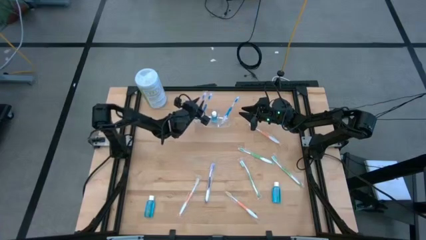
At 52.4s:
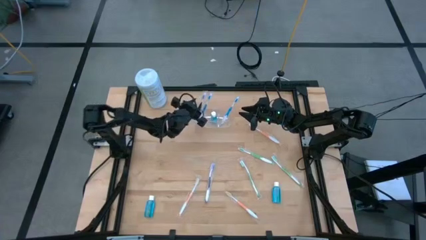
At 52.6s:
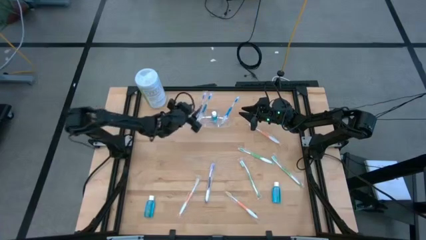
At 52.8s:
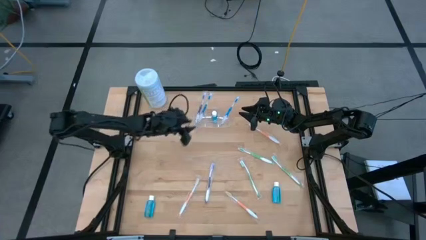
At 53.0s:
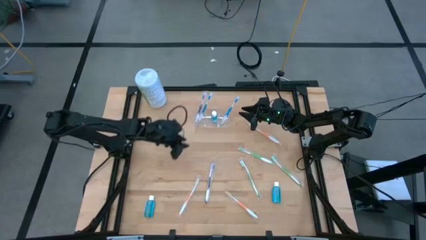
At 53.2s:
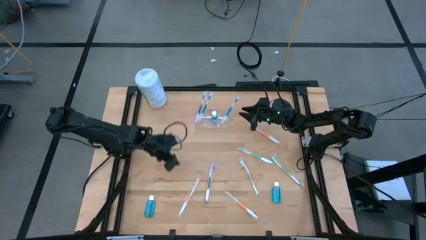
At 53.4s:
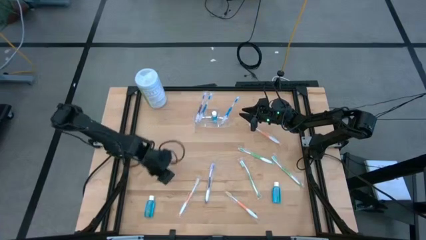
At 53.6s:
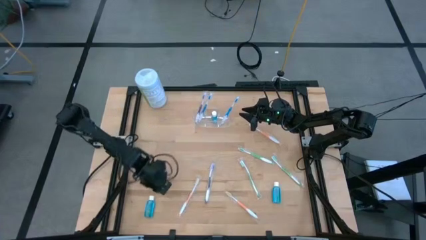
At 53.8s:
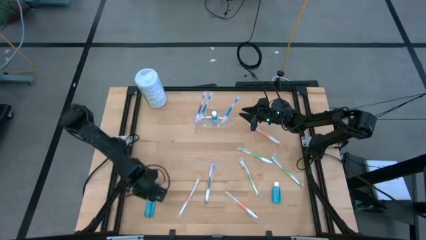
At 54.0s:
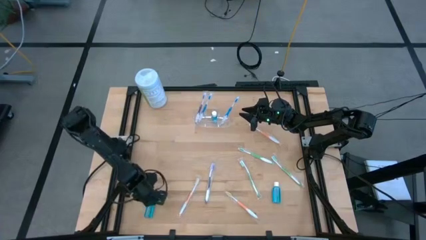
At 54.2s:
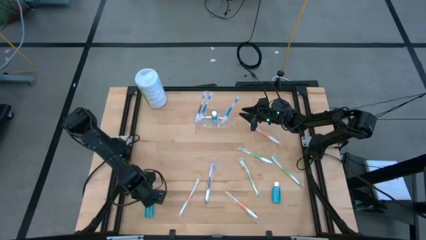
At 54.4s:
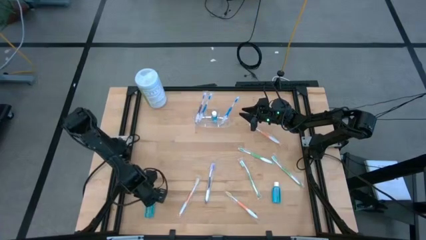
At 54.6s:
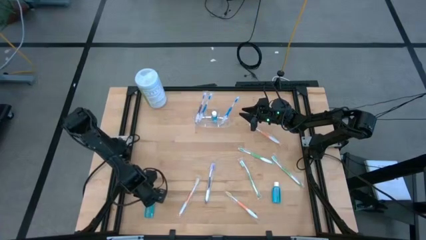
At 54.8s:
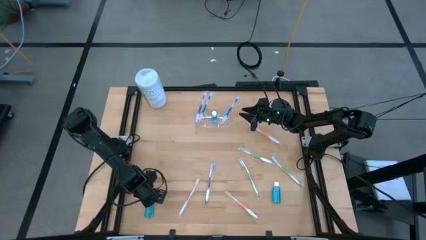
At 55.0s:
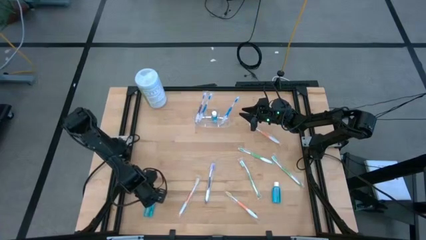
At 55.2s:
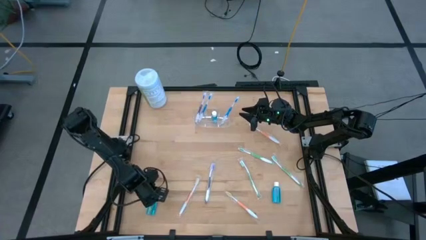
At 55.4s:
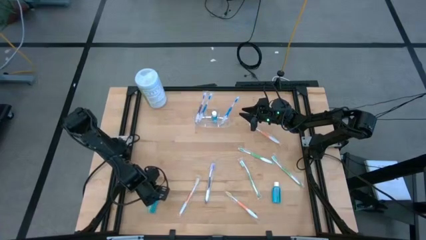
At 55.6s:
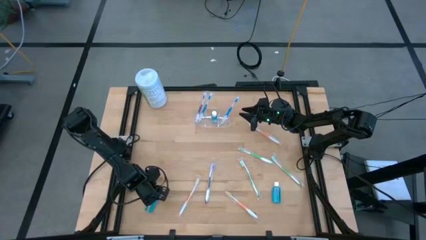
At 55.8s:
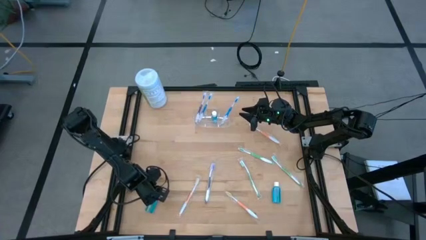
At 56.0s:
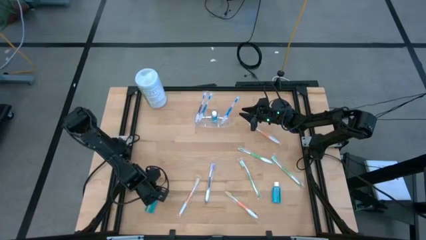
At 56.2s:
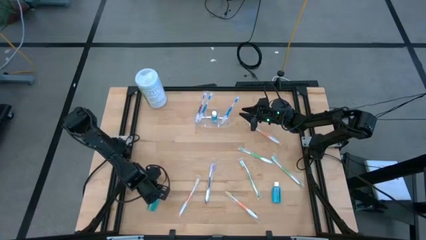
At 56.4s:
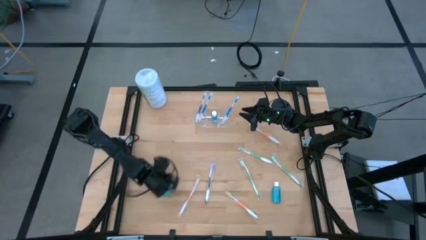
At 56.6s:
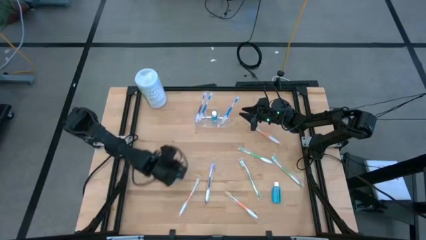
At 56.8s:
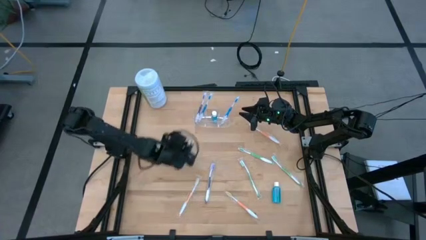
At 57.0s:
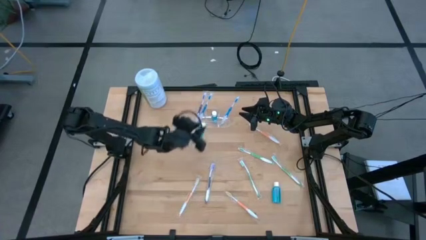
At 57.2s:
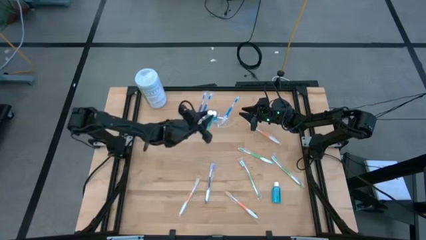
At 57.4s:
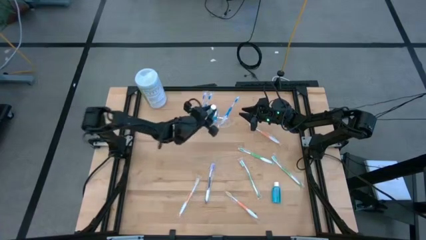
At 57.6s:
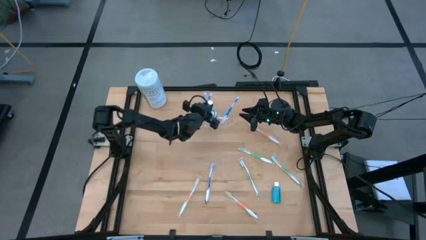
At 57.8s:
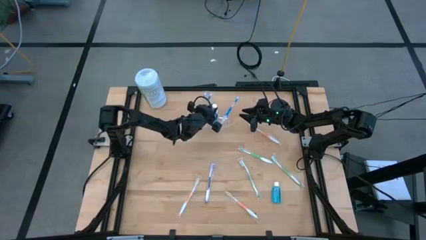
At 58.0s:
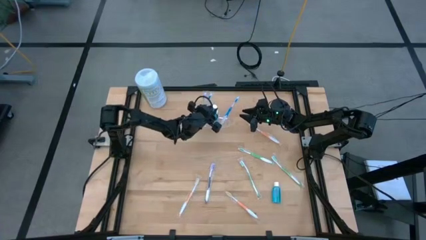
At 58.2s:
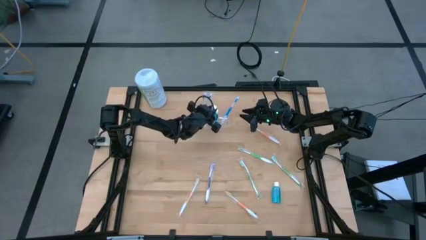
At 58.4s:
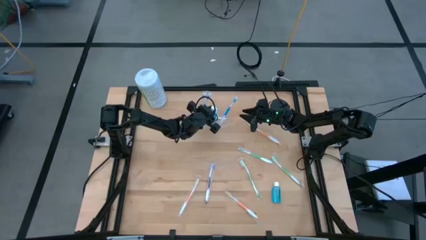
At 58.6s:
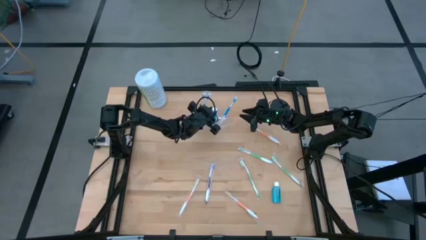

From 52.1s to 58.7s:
Task: Pick & Place toothbrushing station
Put the left blue mouthwash bottle into the transparent organizer

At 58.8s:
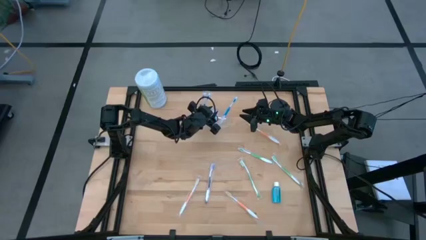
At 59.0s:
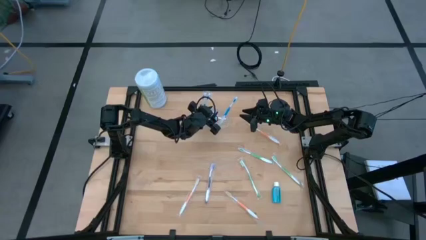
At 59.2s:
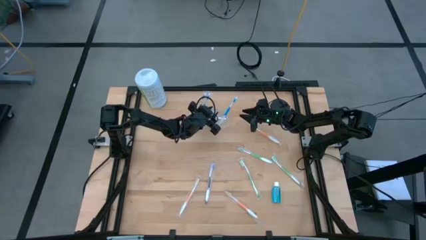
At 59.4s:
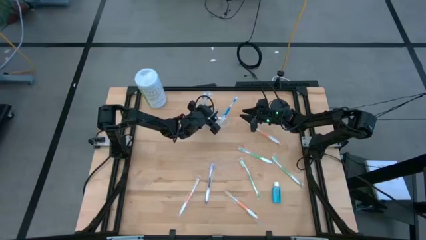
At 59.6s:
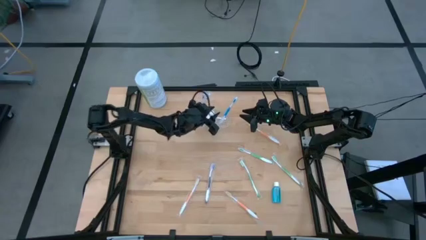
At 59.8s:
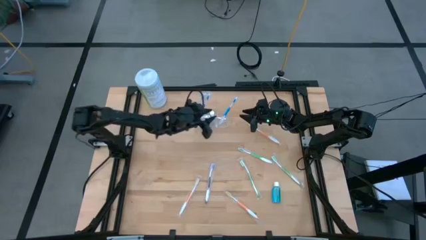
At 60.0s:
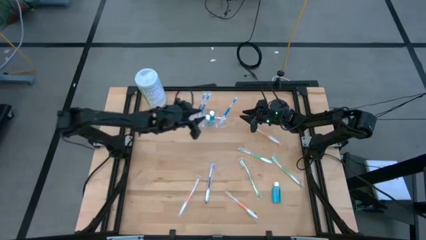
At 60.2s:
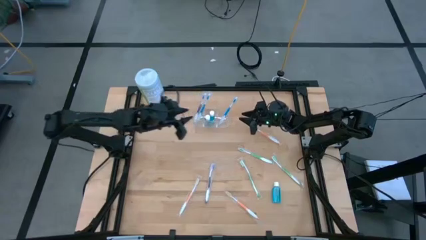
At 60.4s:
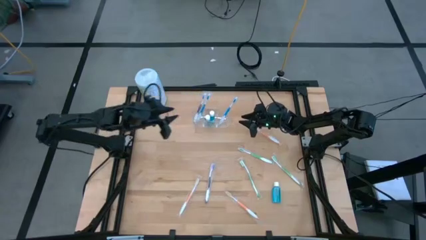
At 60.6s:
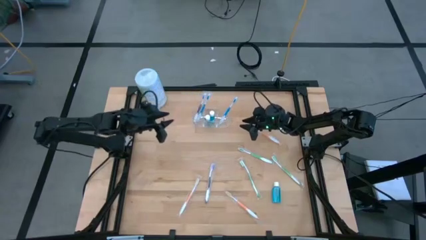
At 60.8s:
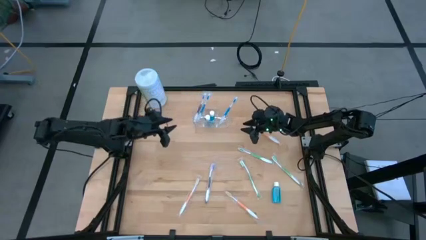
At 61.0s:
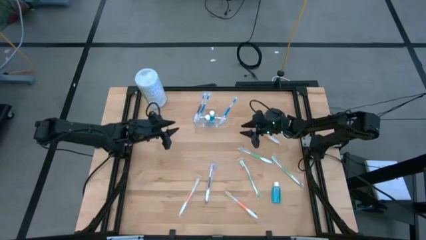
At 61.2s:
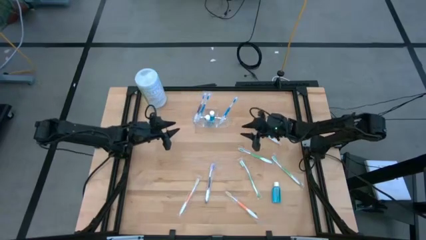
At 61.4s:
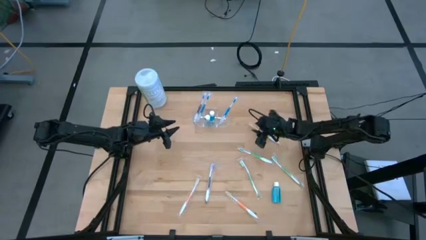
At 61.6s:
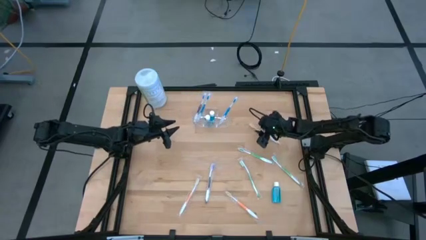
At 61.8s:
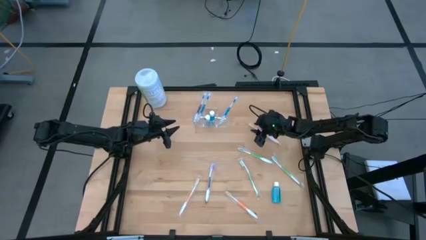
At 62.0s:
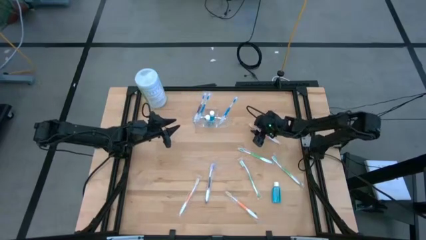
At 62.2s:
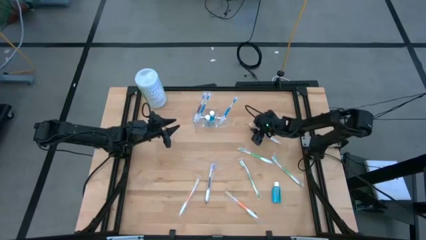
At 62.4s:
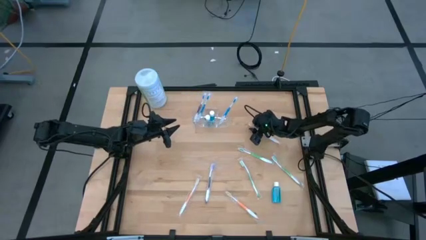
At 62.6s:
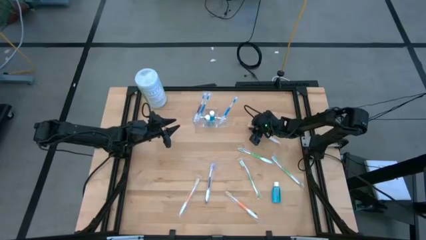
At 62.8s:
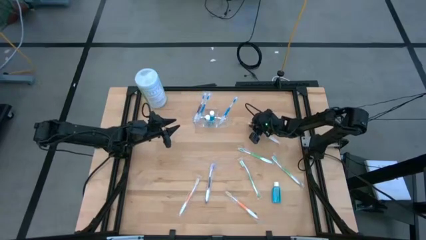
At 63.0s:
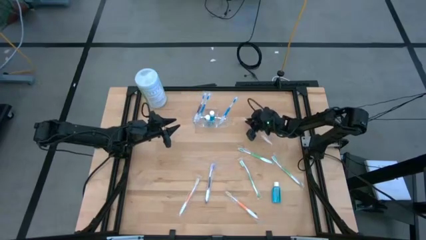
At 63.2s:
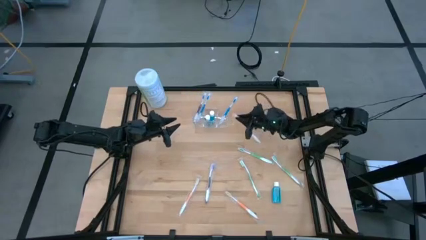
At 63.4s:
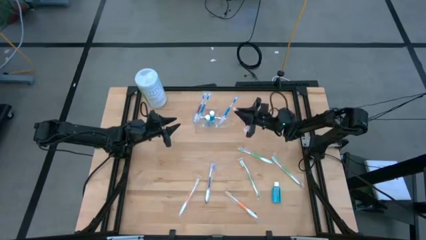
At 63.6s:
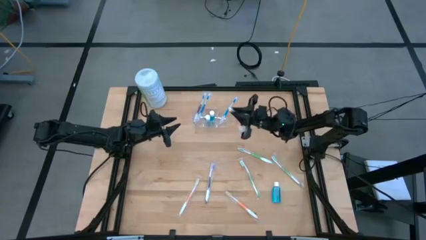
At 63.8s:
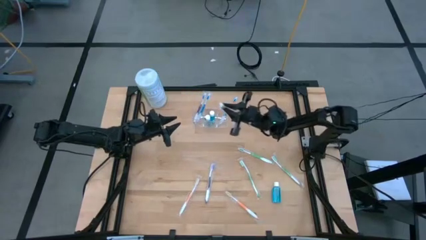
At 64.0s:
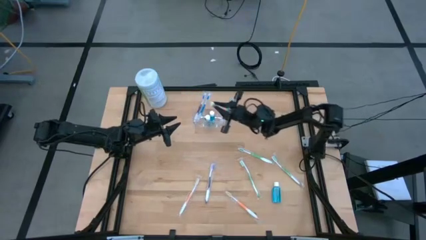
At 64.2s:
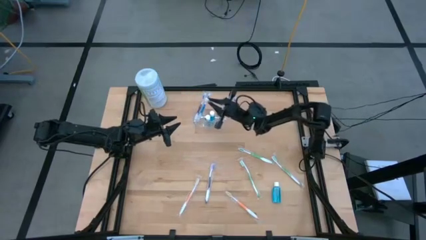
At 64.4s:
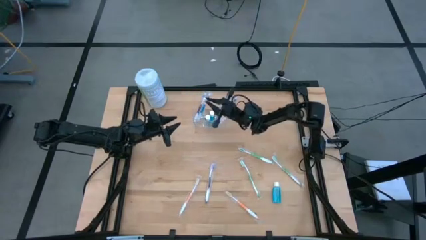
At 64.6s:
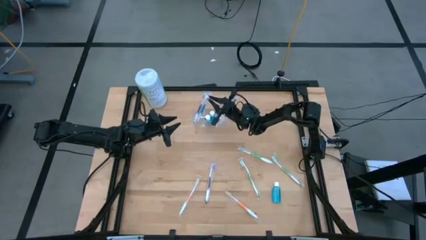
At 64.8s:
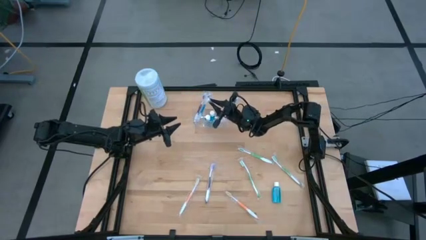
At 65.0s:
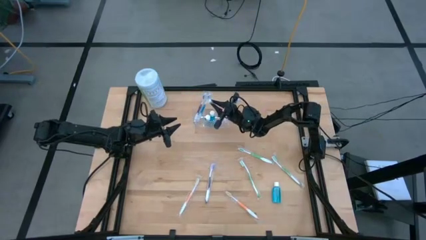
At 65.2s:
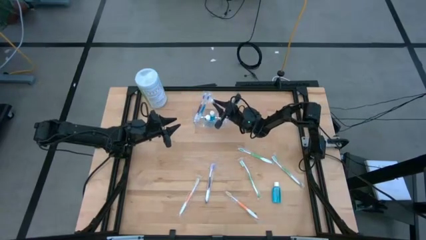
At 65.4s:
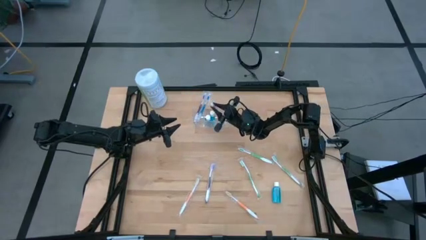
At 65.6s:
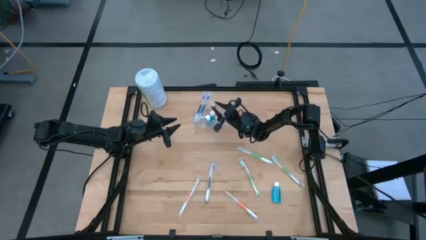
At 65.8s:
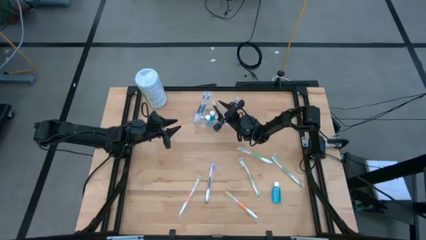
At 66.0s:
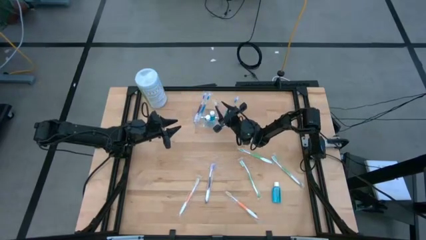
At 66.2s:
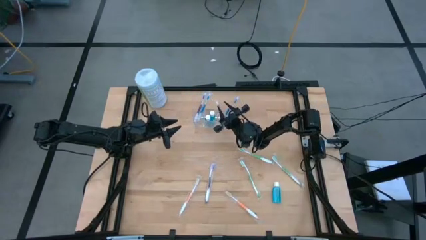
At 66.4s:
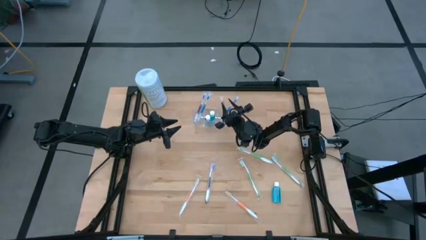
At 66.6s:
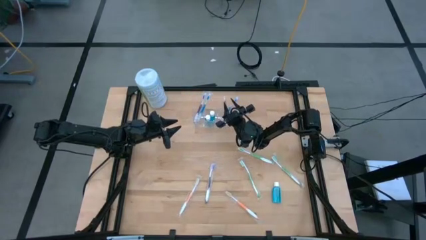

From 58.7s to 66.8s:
Put the top orange toothbrush into the transparent organizer

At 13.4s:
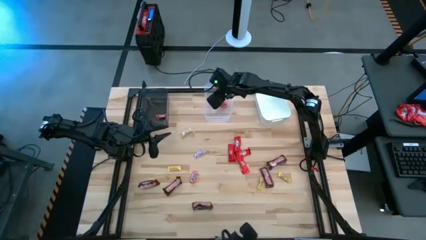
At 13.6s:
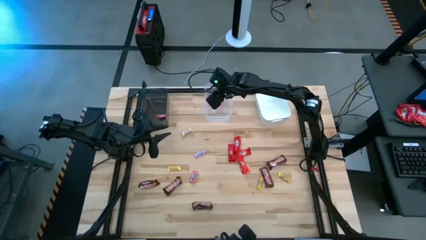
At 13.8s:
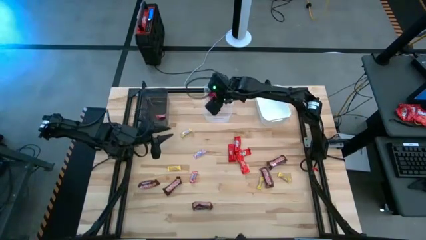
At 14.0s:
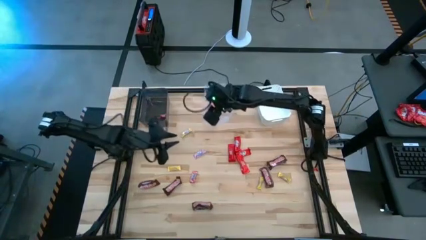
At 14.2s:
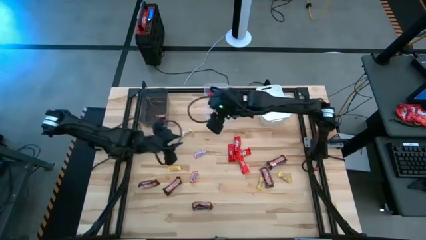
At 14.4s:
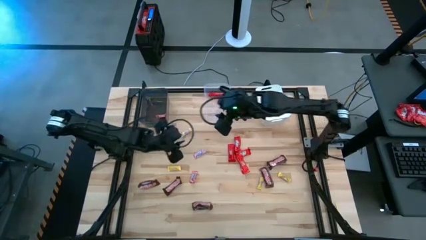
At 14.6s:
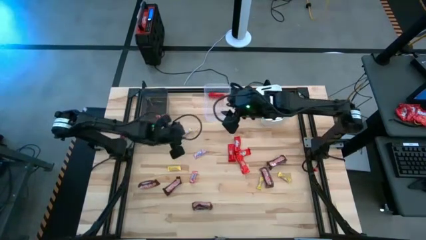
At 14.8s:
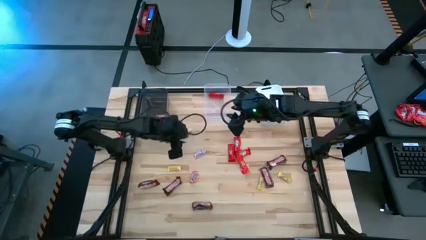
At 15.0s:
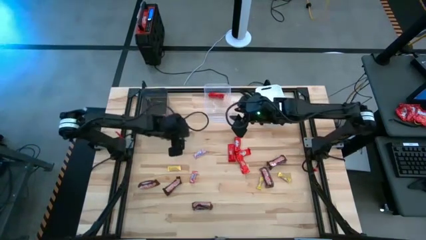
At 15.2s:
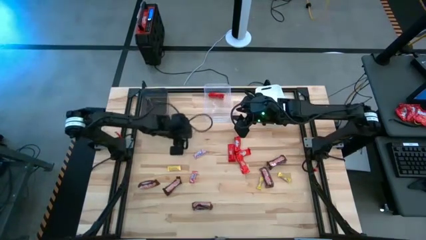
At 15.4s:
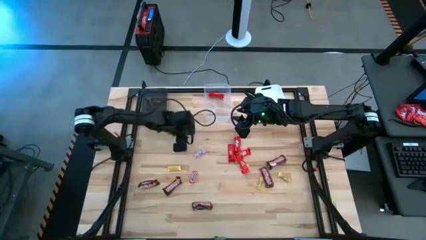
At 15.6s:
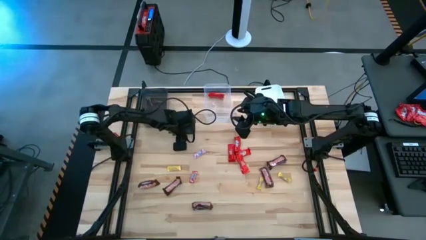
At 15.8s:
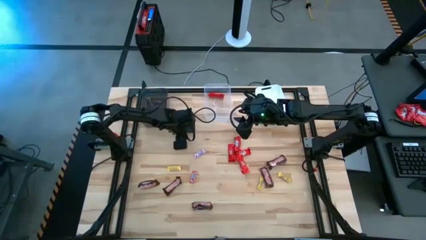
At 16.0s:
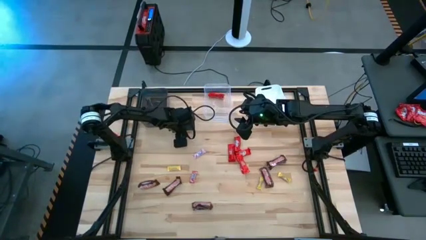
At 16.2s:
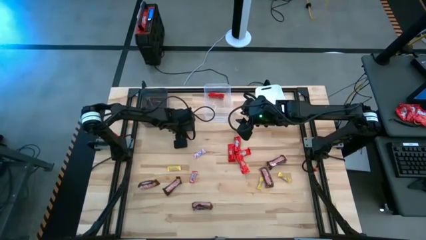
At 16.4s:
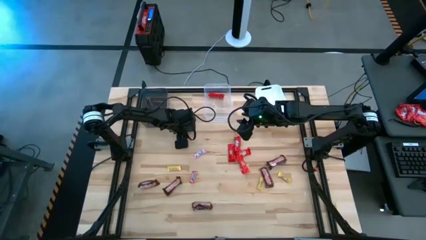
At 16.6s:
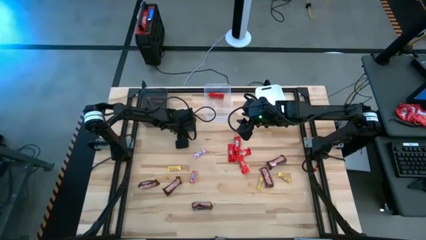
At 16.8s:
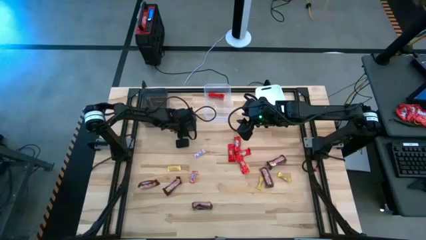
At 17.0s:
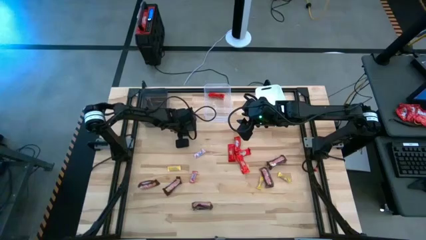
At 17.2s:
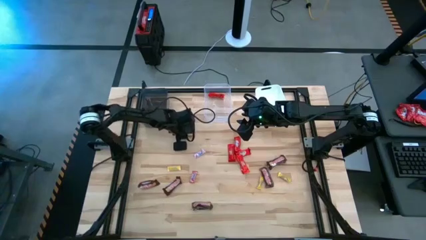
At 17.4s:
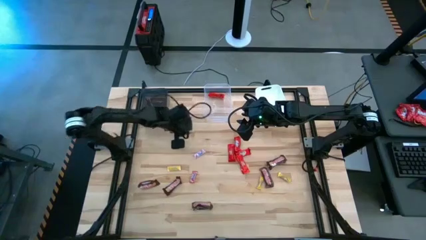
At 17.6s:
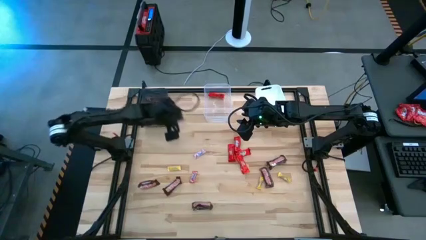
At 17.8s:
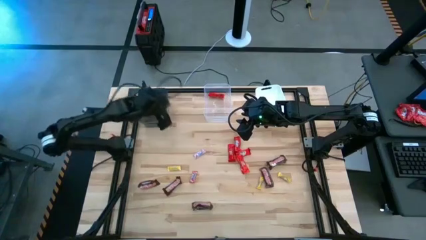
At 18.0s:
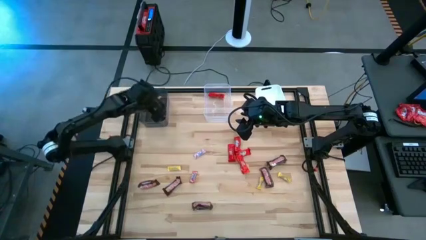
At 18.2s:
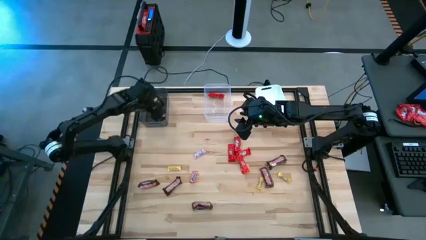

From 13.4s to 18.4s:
Task: Sort candy by brand, put in halloween buckets
Put the yellow candy into the black bin
